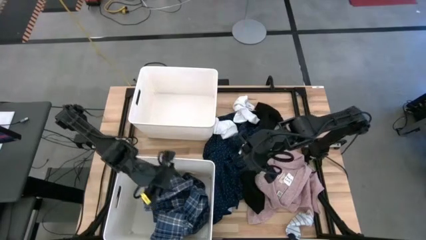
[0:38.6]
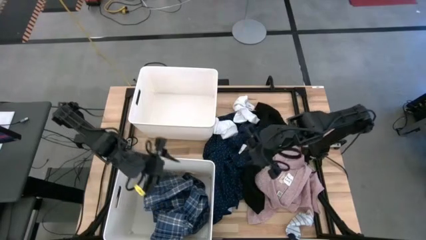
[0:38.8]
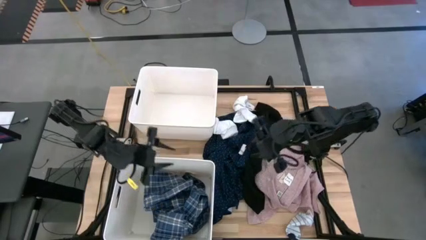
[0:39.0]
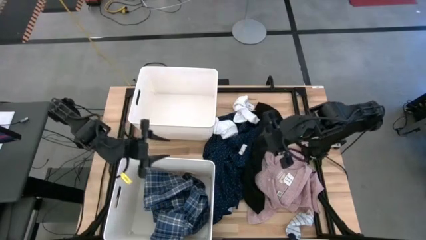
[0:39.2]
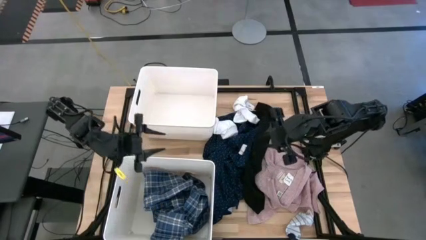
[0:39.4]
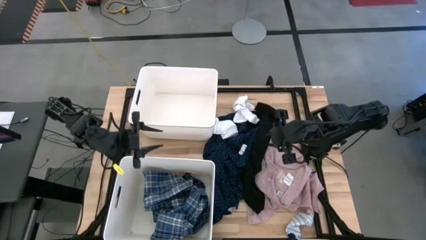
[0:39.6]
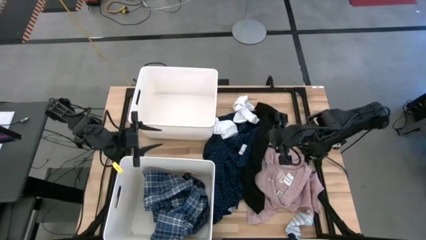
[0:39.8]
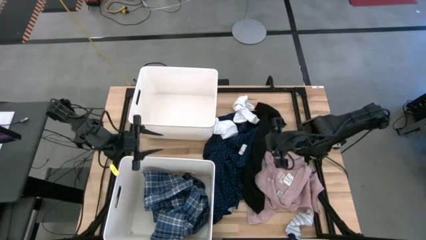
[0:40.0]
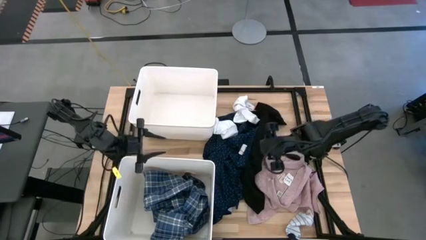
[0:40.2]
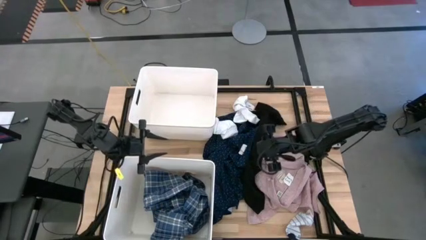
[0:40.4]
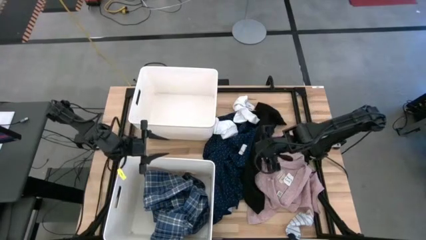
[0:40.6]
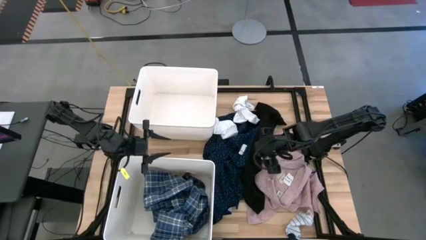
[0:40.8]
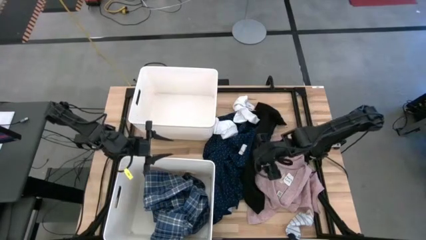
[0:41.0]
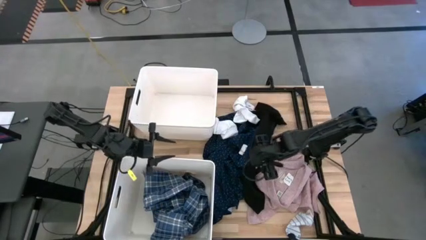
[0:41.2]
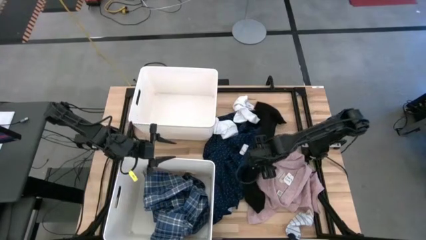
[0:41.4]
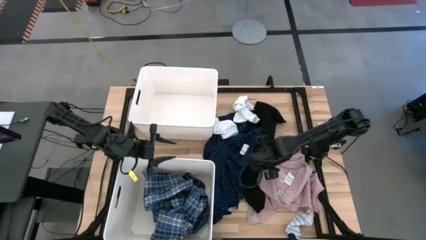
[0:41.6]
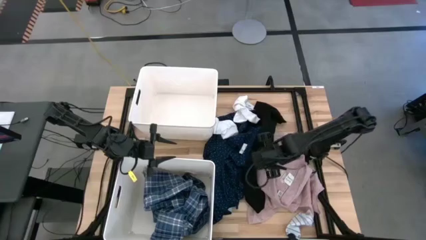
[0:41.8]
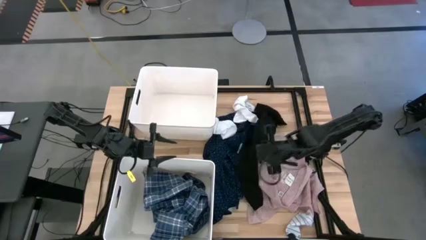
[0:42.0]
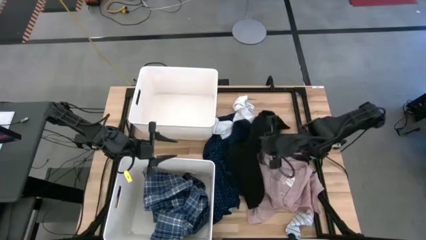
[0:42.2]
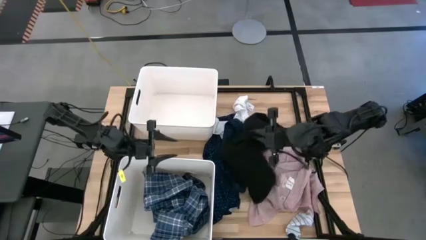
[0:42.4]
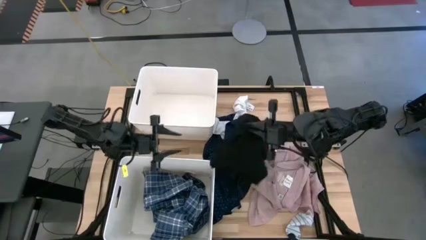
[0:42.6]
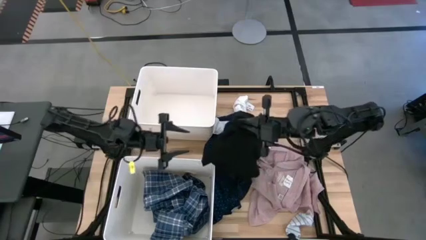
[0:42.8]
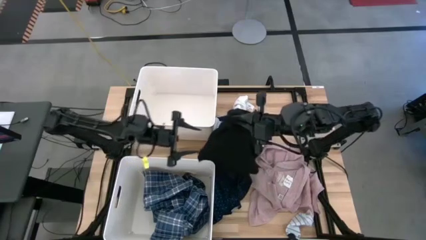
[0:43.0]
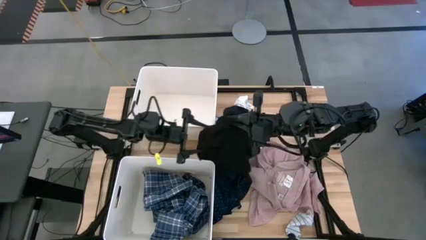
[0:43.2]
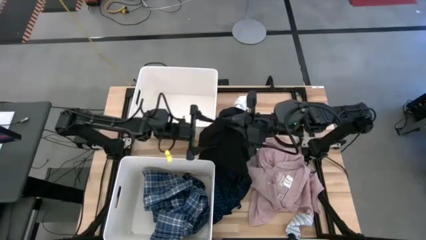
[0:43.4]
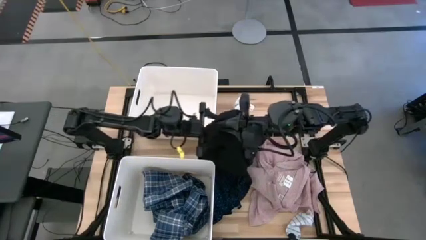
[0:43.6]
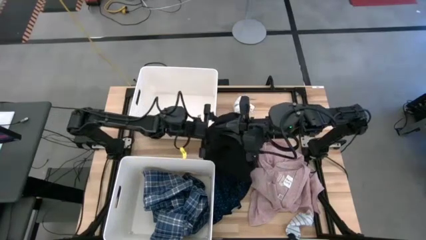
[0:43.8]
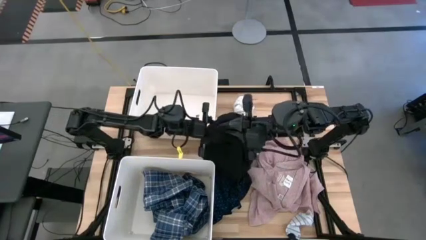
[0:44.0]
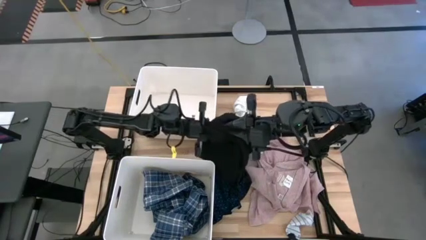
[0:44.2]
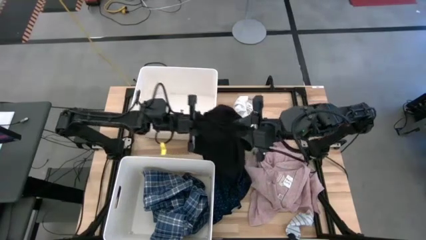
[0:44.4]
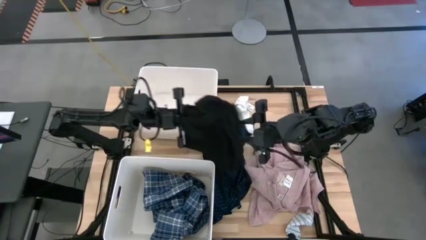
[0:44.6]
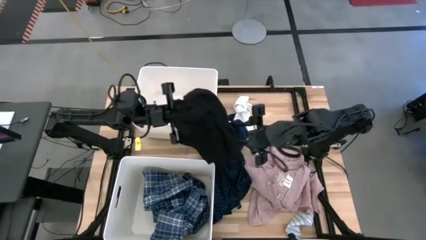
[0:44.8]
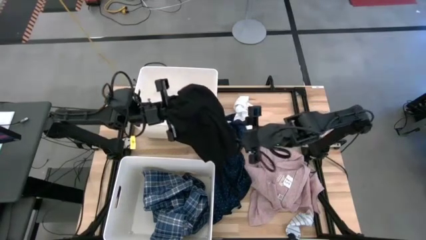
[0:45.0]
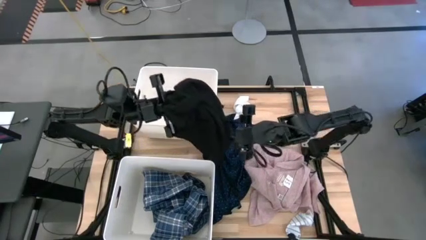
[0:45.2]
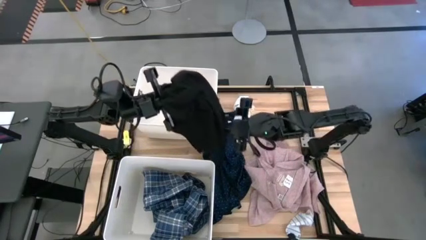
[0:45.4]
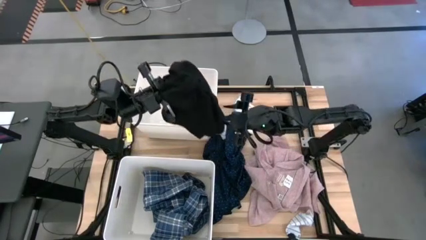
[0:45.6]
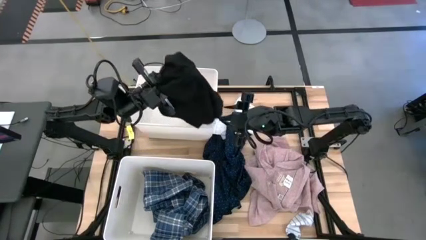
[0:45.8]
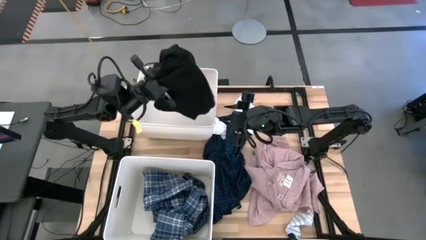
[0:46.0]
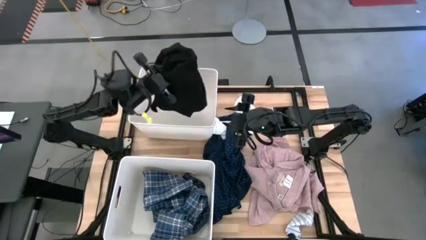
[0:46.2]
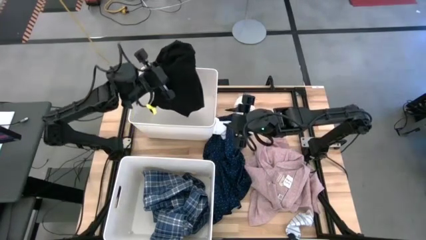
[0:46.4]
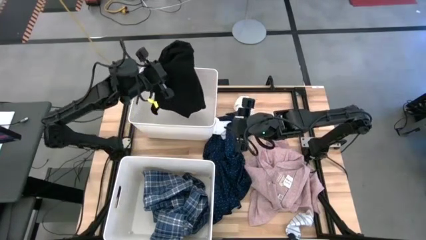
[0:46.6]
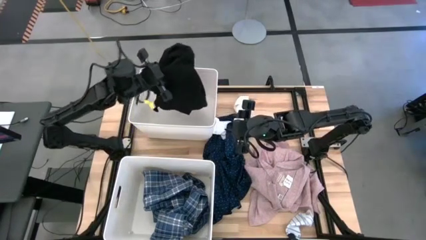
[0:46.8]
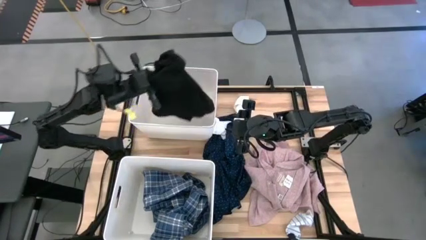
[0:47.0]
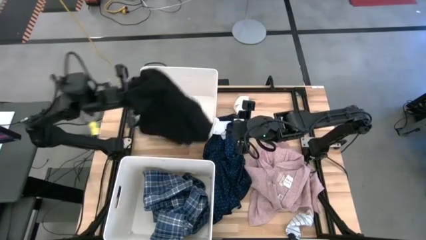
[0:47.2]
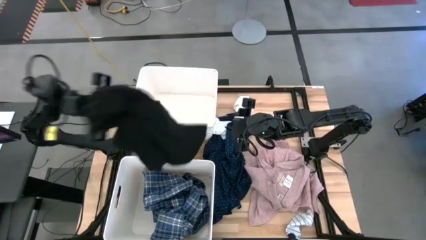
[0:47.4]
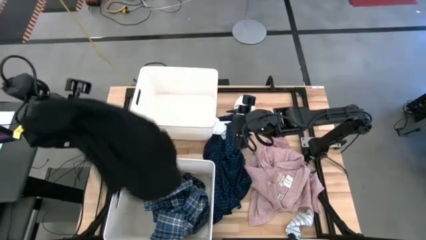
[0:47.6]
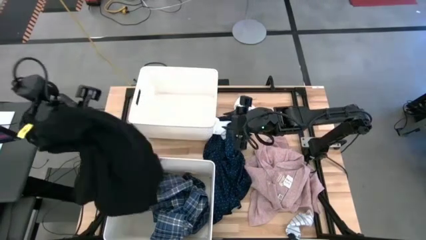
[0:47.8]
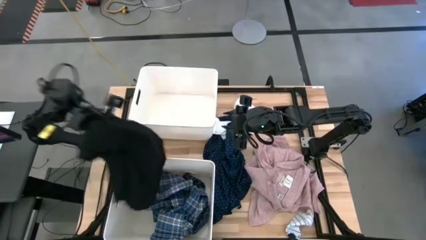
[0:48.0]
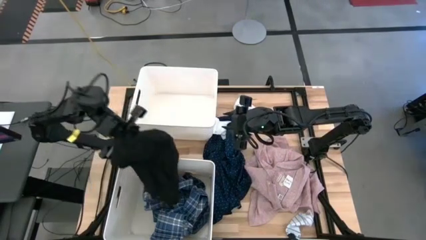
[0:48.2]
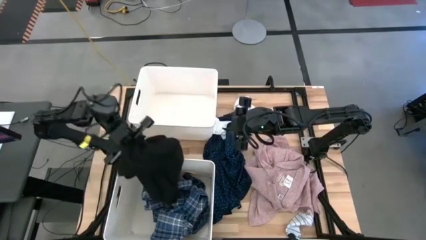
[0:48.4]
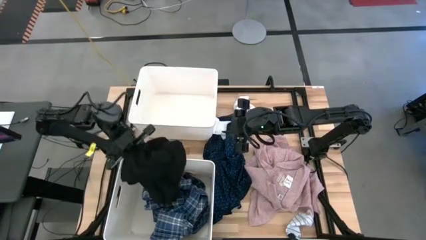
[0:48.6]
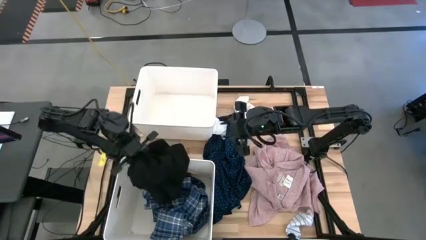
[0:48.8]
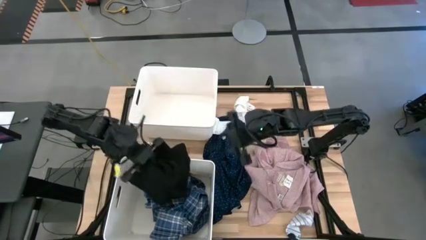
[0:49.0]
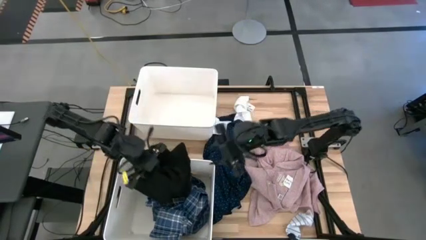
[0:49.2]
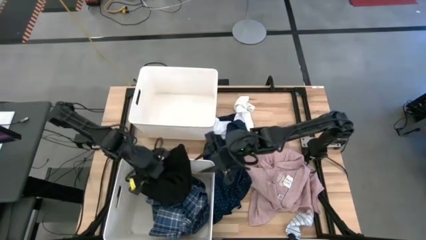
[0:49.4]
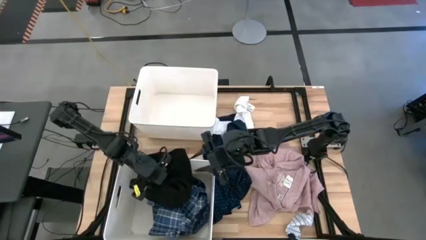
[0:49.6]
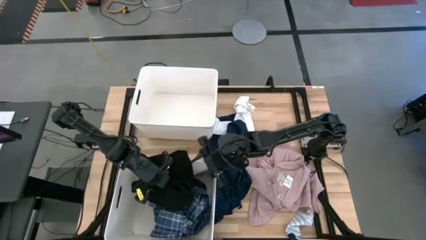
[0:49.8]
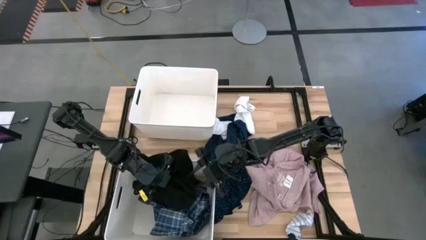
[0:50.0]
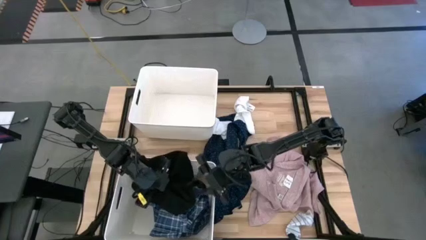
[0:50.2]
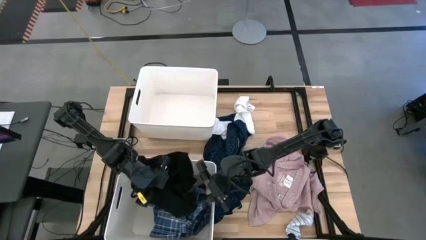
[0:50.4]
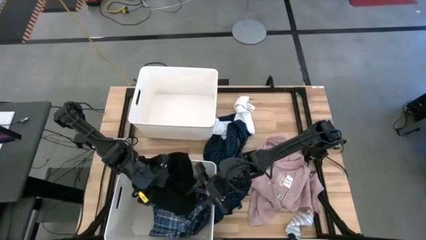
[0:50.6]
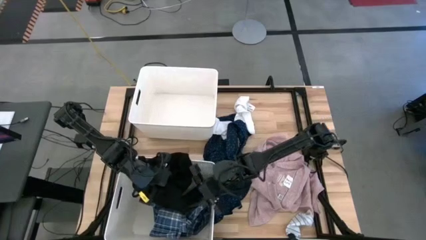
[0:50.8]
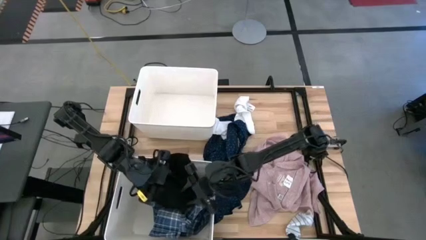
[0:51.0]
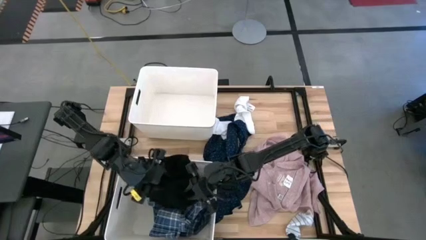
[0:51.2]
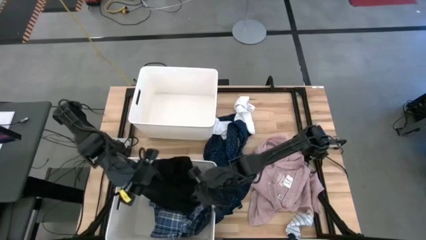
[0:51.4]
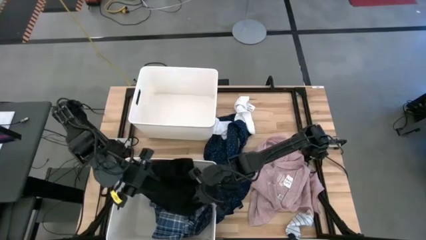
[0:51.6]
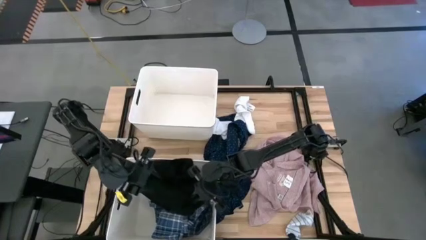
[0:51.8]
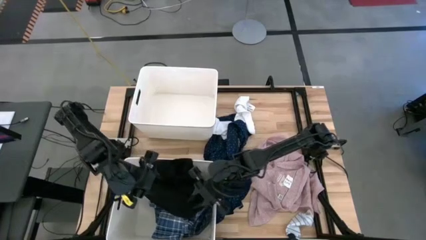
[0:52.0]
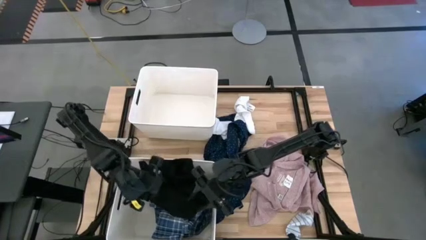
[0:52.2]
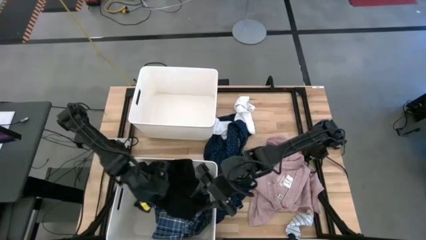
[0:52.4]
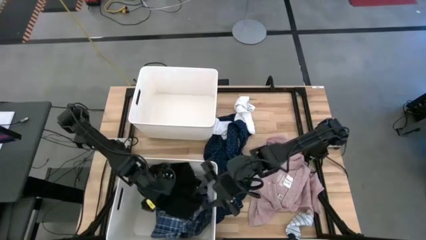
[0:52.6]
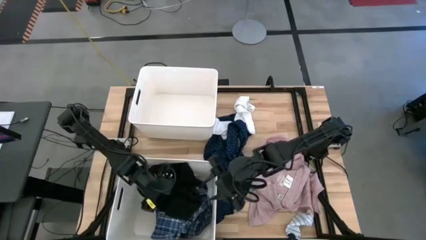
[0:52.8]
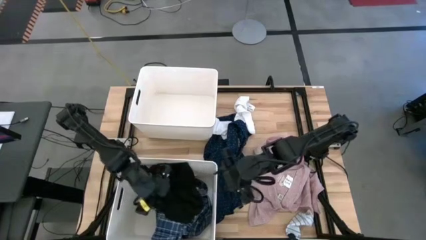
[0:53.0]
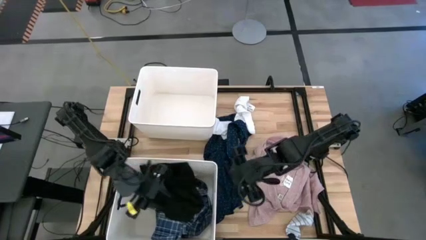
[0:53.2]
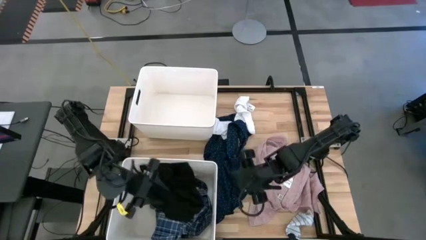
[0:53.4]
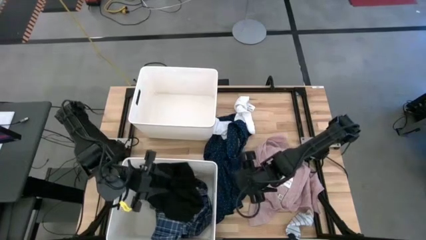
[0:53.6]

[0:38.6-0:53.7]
Task: Sort clothes
Put the black jacket into the bottom white laundry organizer
